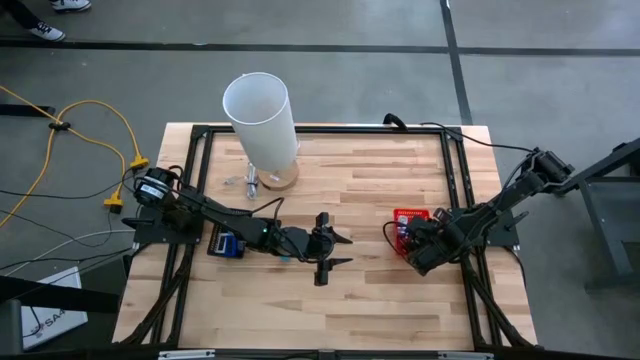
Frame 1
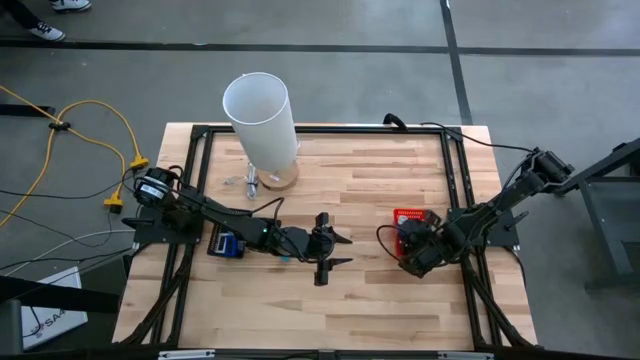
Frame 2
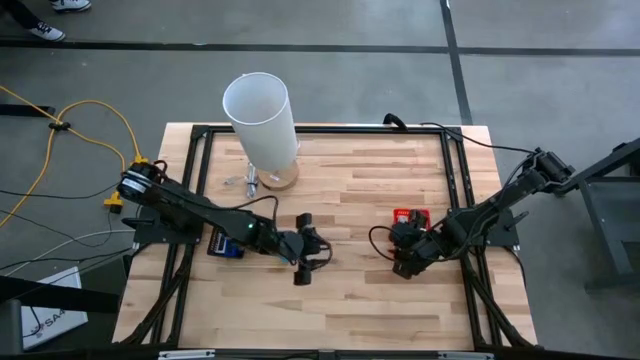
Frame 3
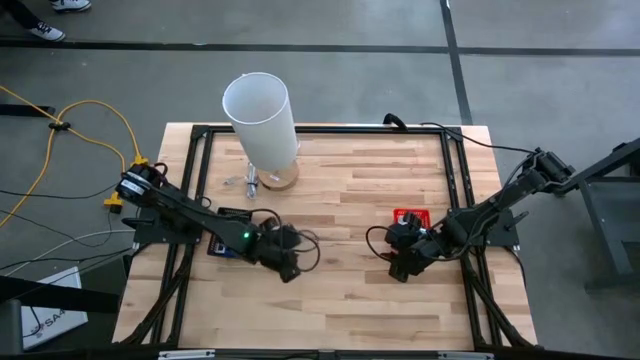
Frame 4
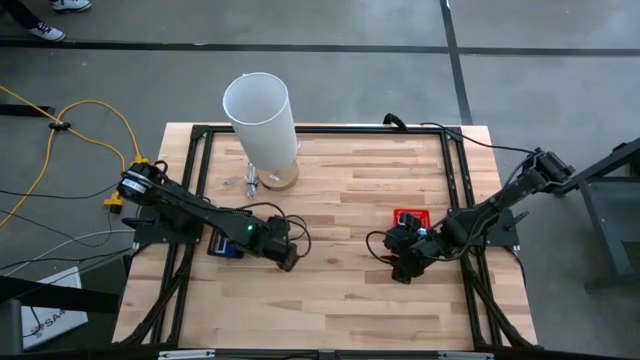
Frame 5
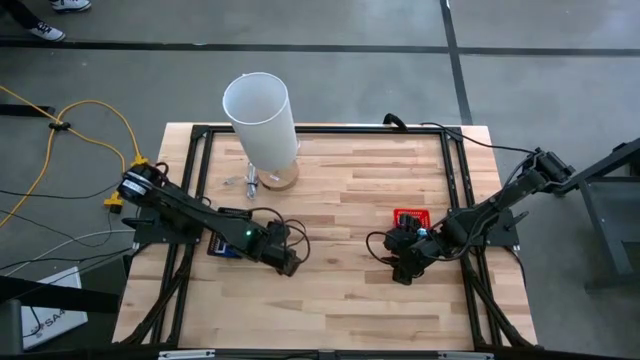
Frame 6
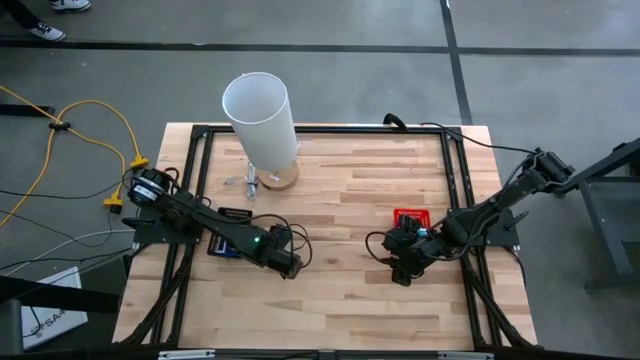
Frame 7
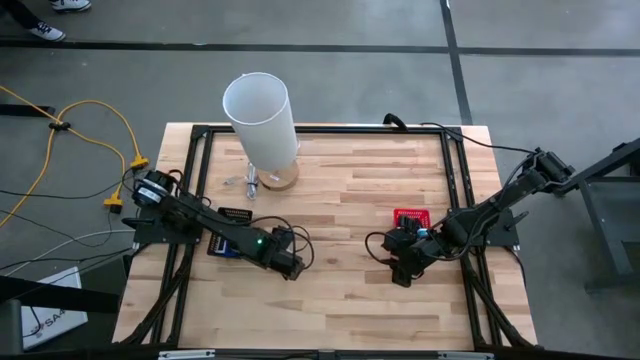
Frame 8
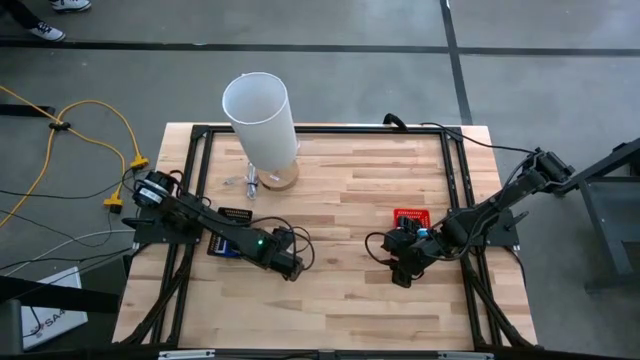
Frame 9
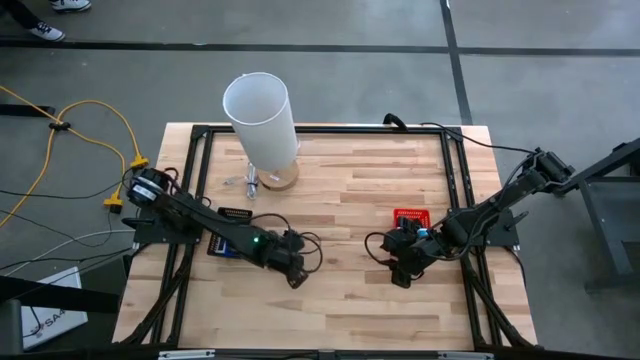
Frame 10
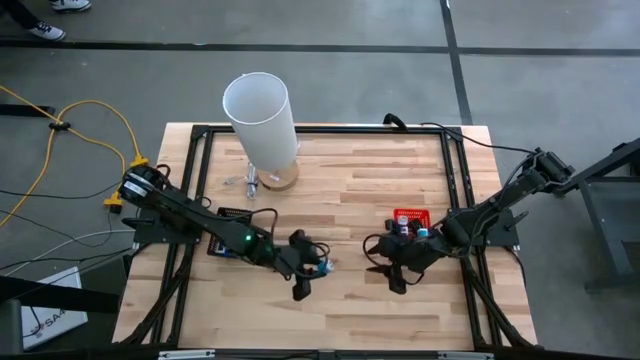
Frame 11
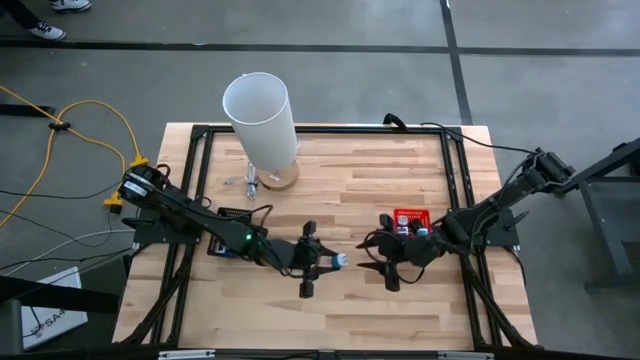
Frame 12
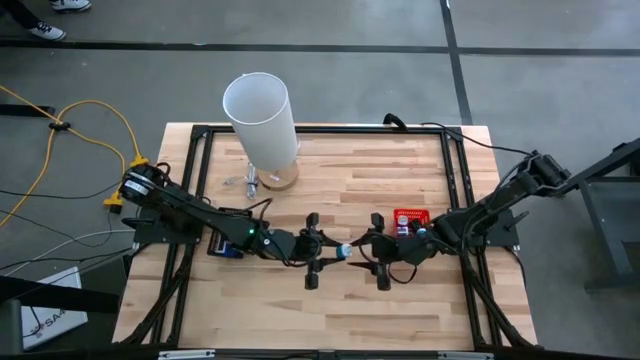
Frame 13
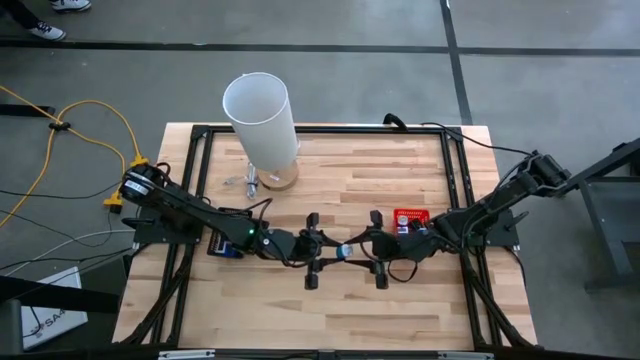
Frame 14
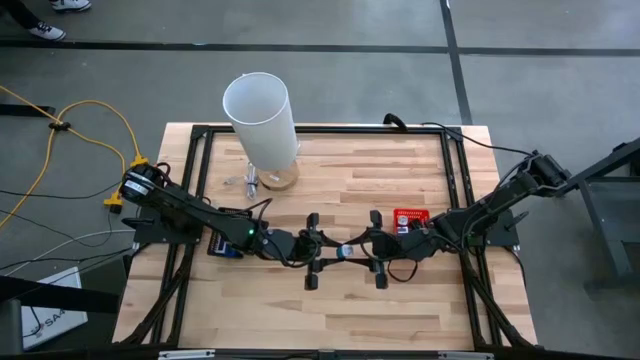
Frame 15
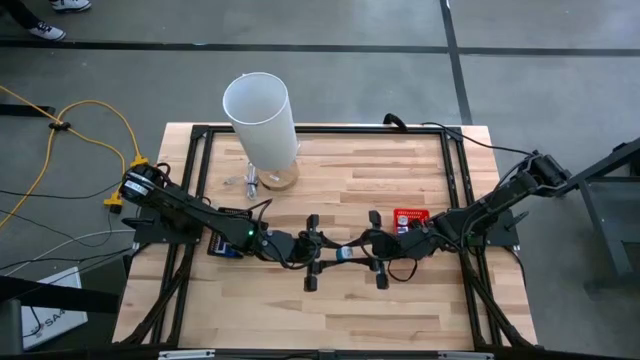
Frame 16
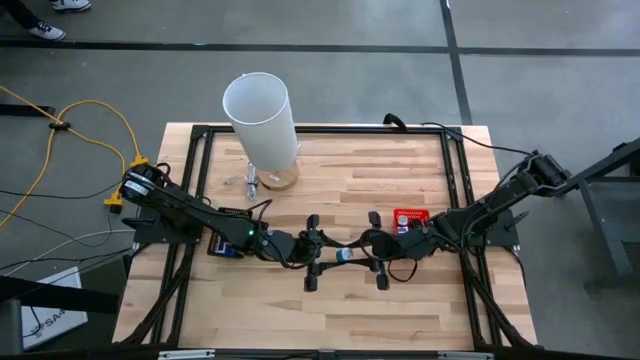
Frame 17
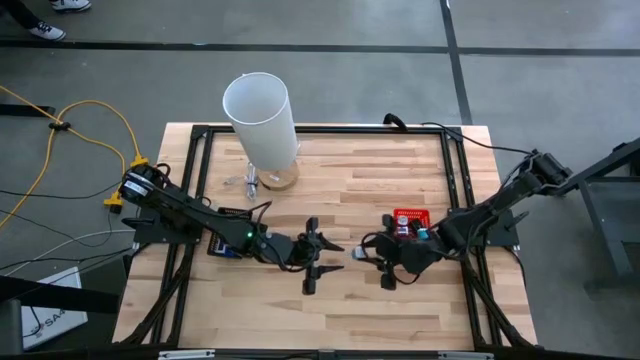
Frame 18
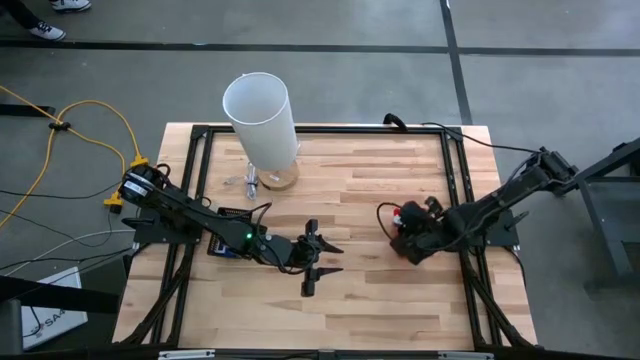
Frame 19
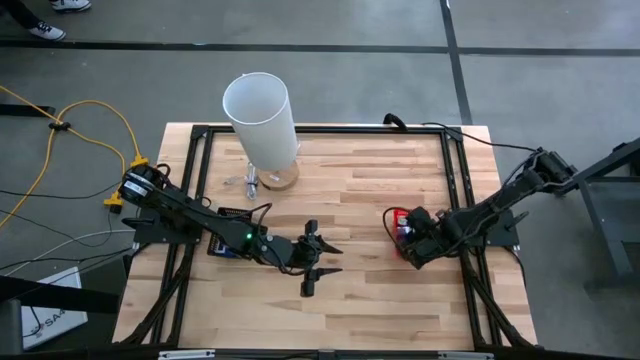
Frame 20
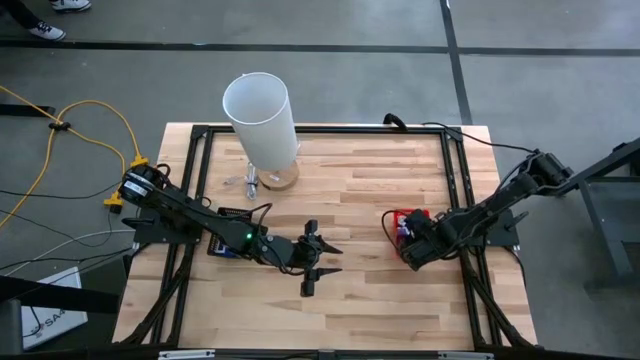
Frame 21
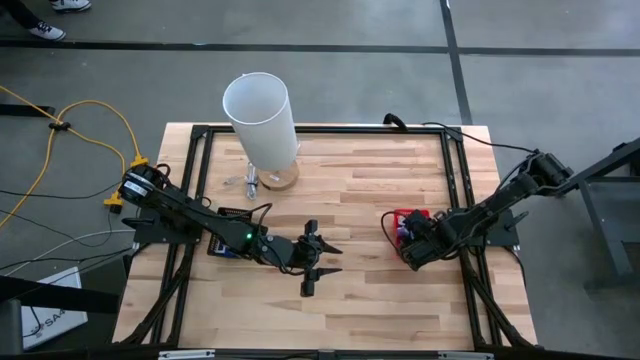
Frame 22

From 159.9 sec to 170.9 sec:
Task: Pick & Place Office items
Put the blue charger adapter into the red bin

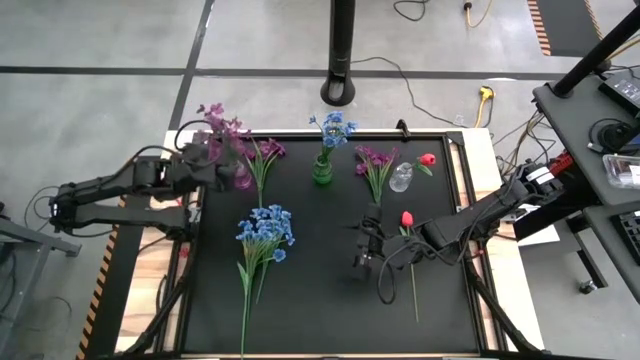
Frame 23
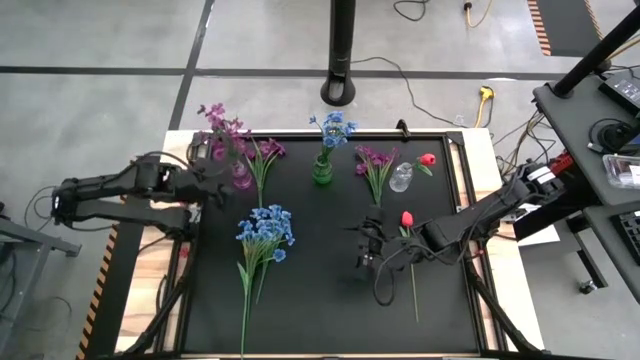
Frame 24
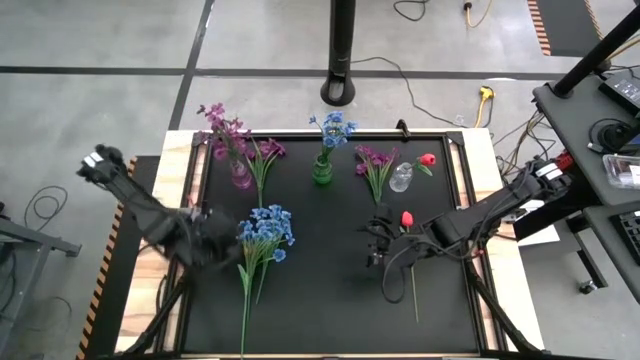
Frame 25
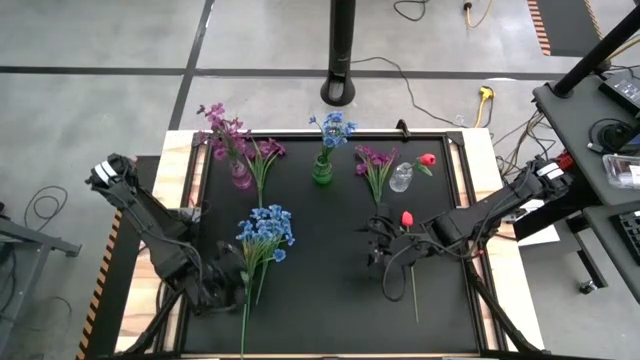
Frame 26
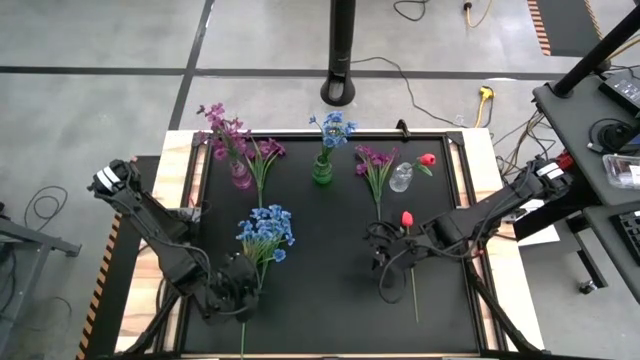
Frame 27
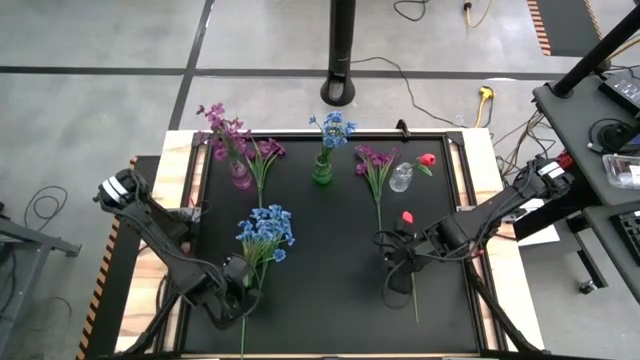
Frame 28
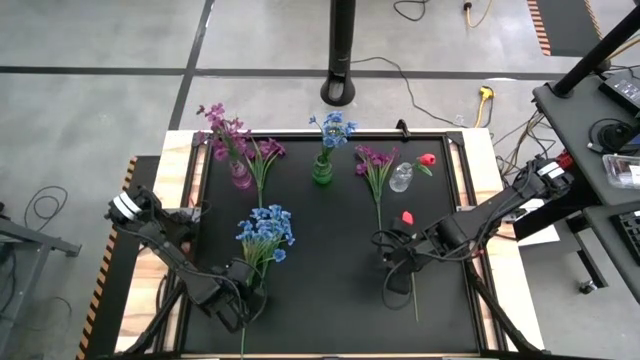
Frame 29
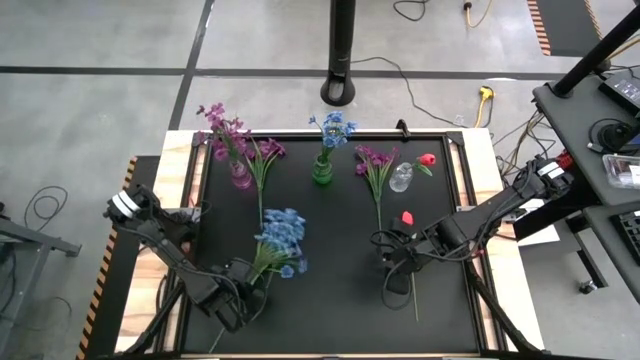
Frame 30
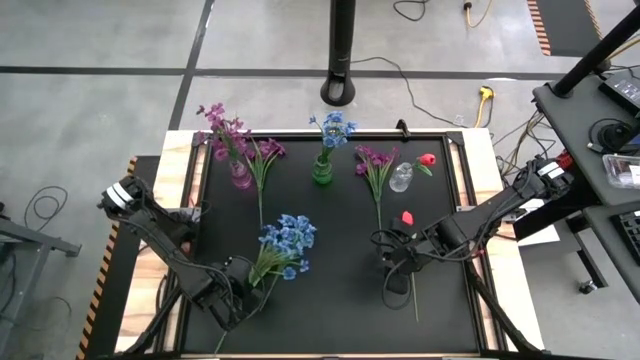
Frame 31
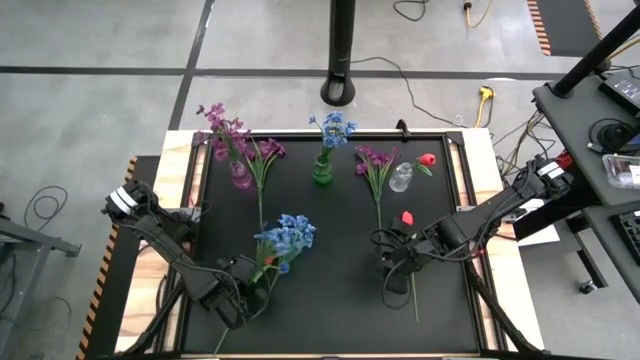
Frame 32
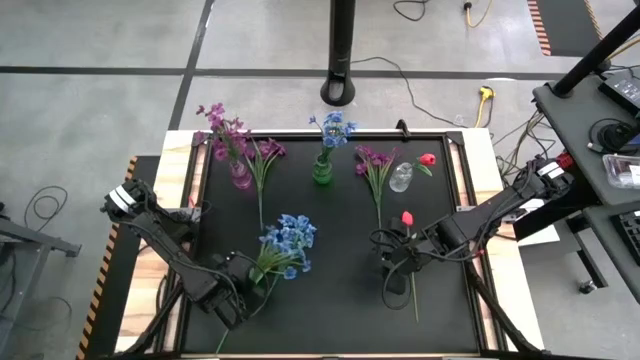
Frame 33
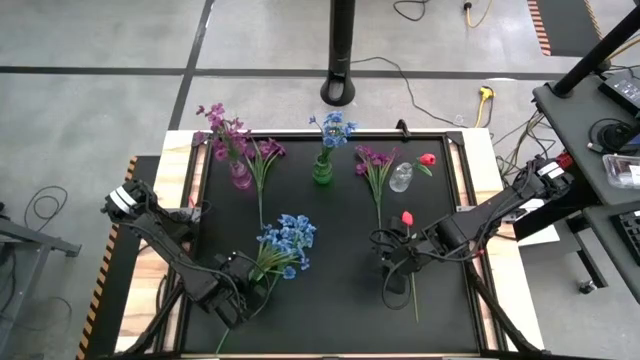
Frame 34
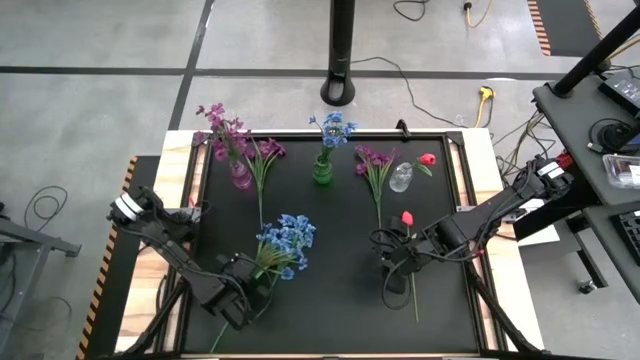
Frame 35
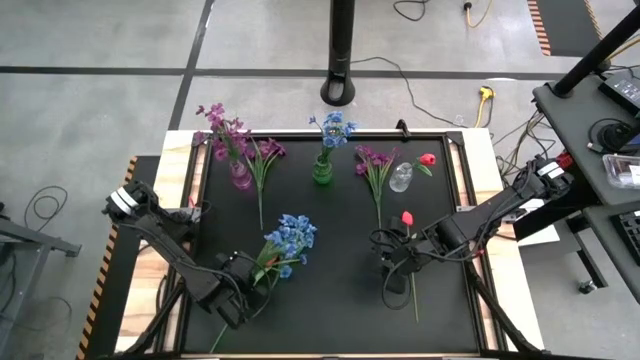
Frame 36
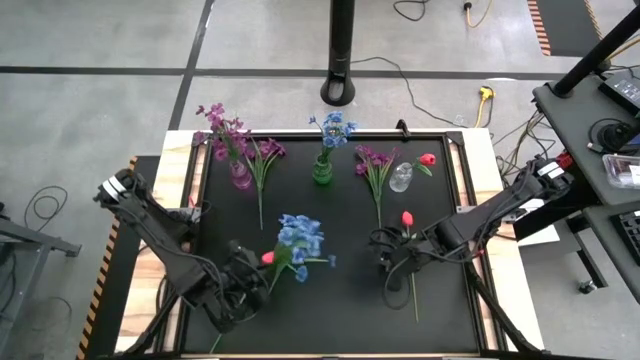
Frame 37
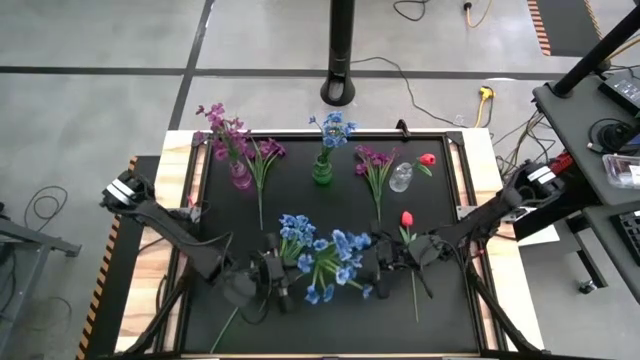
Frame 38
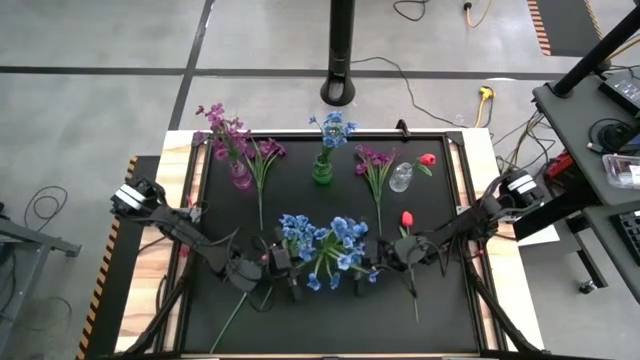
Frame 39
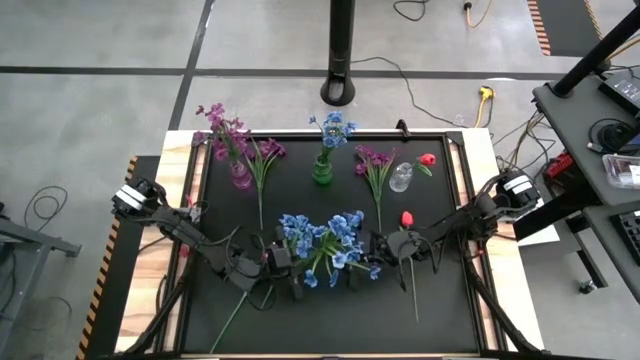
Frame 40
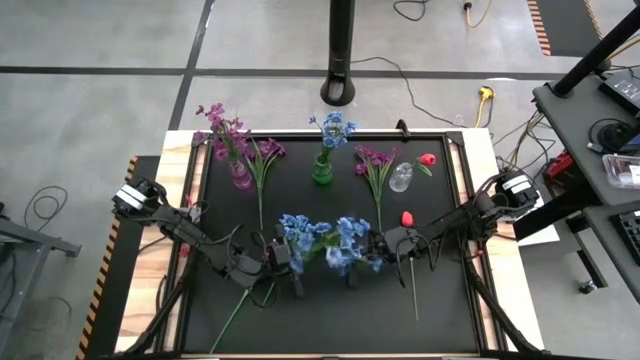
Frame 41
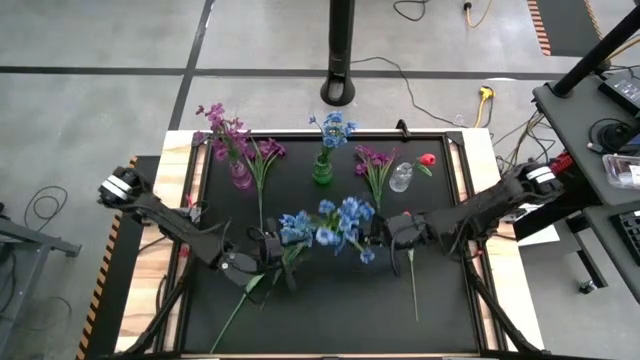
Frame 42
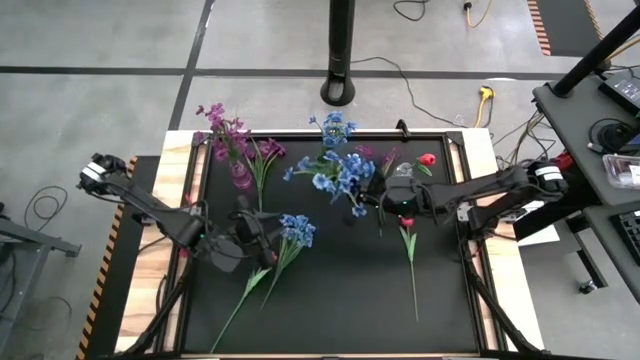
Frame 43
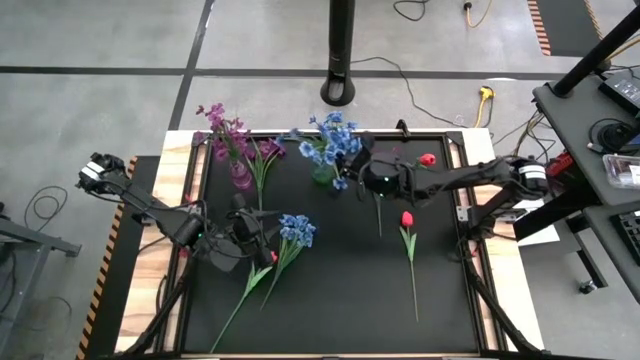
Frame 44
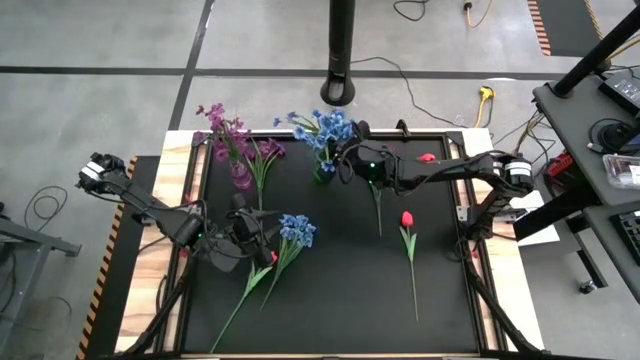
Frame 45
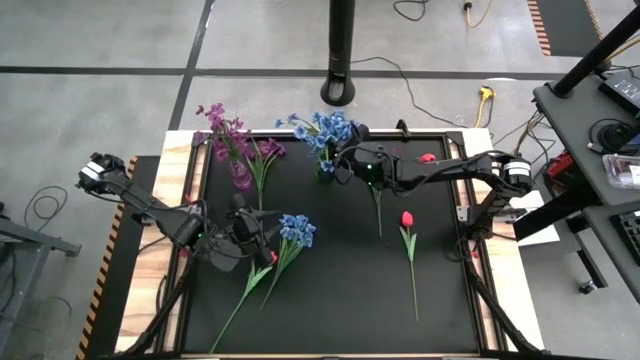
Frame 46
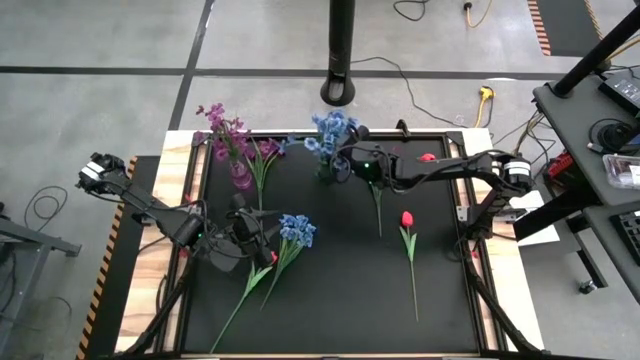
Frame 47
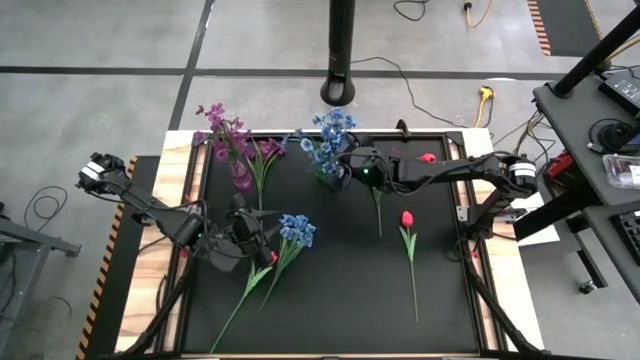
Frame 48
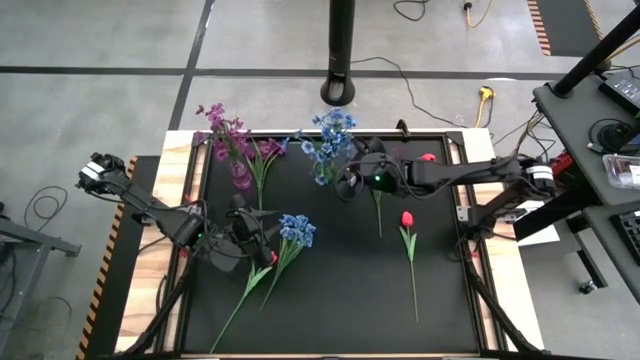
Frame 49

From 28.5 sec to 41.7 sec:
Task: Sort flowers into vase by color
Put the bottom left blue flowers into the green vase
